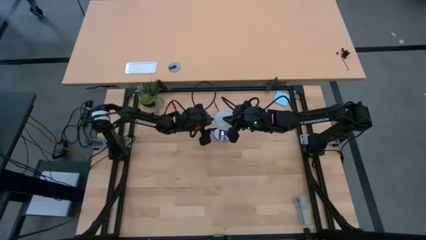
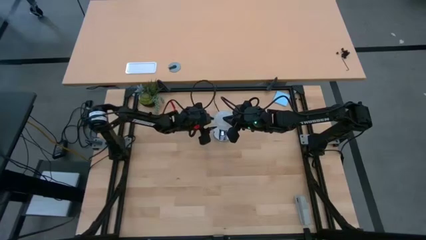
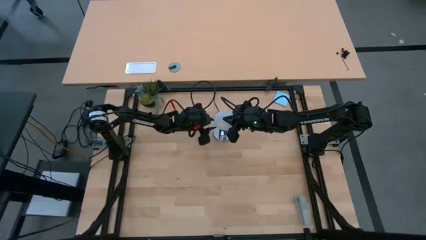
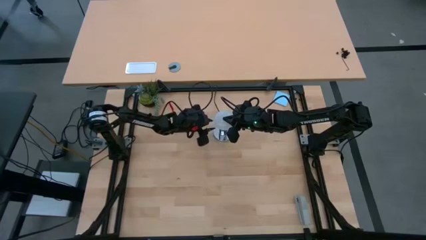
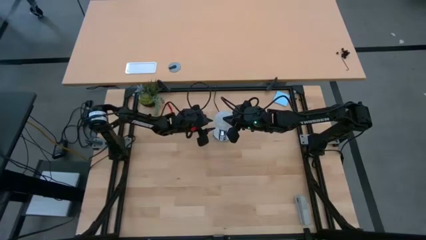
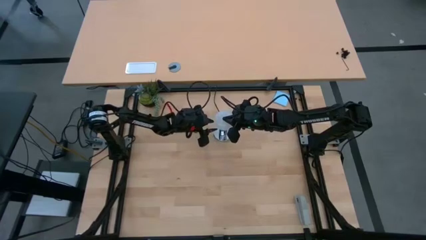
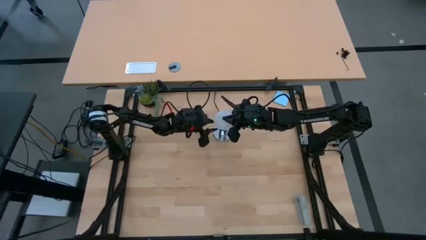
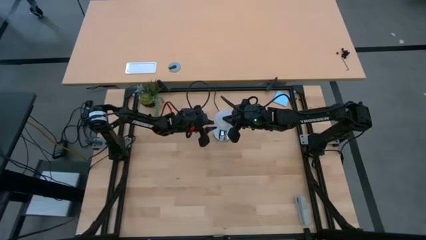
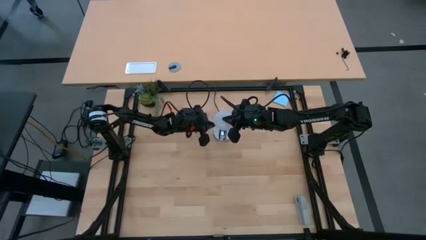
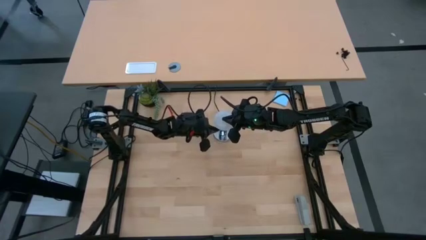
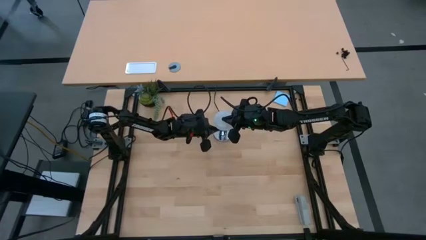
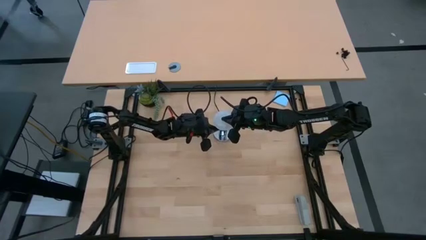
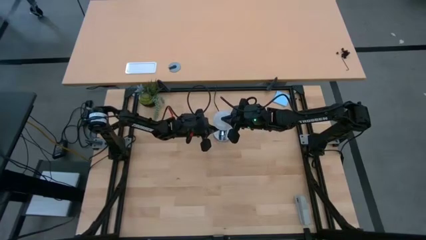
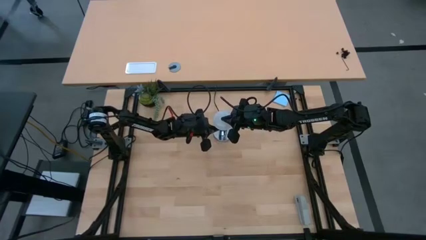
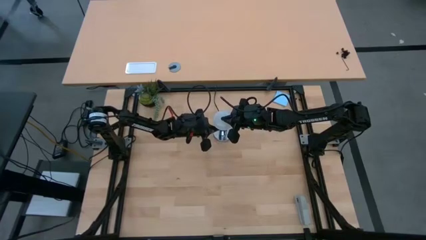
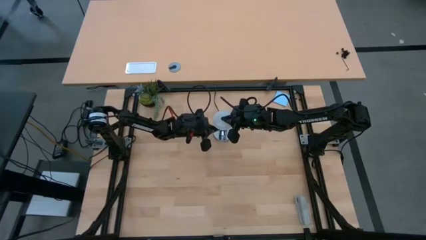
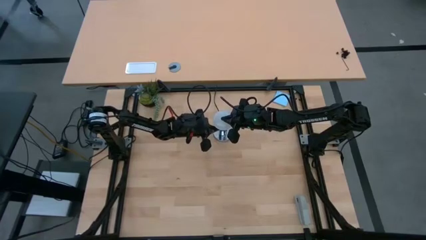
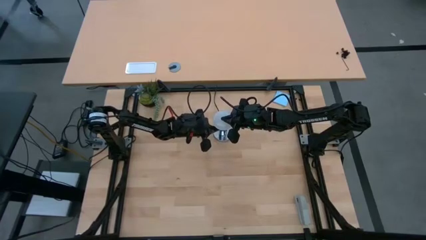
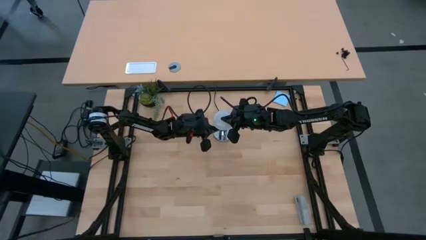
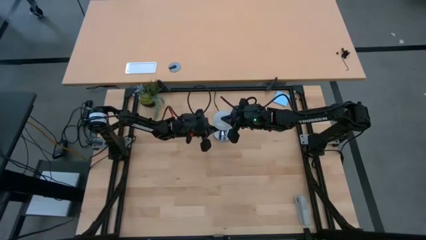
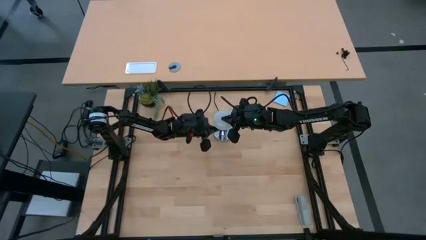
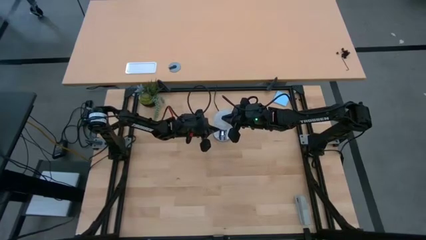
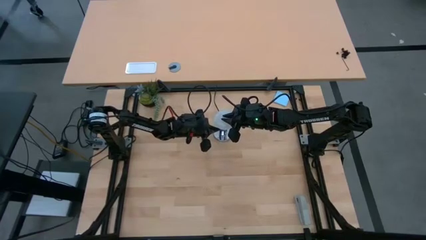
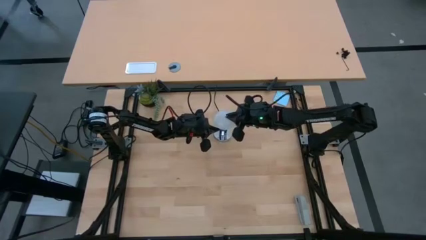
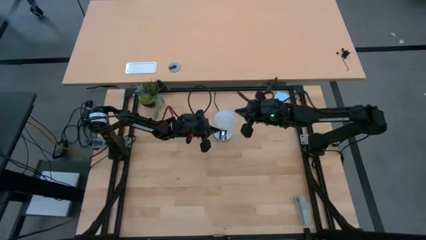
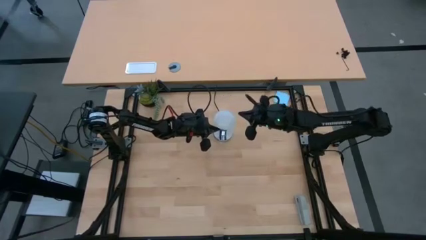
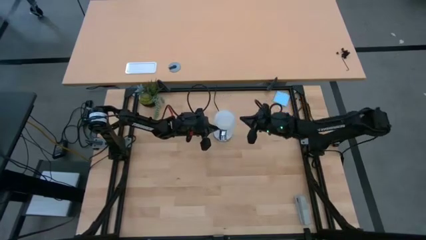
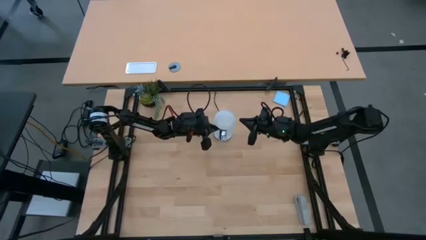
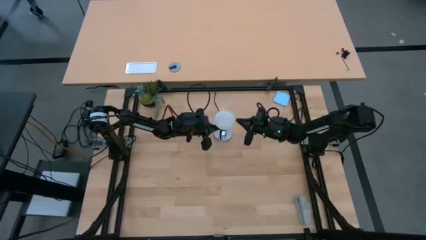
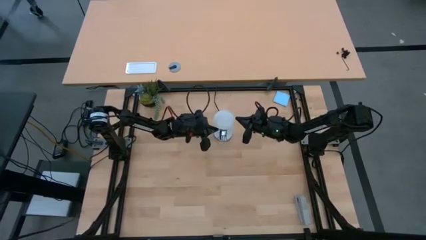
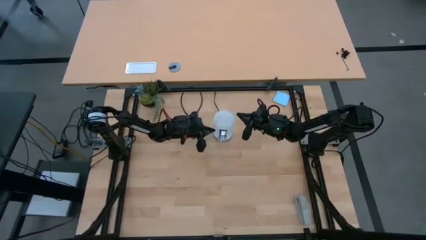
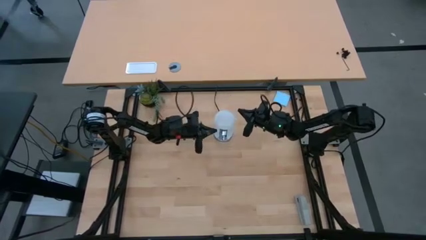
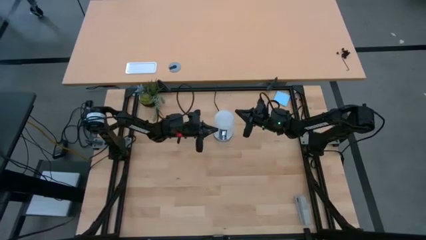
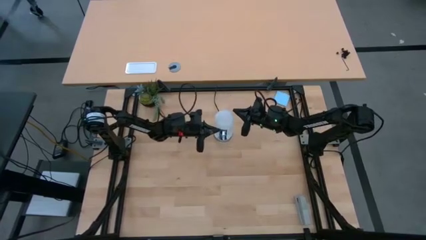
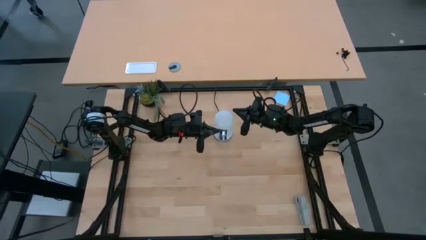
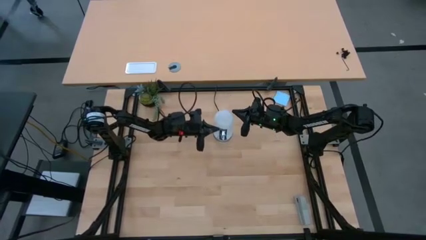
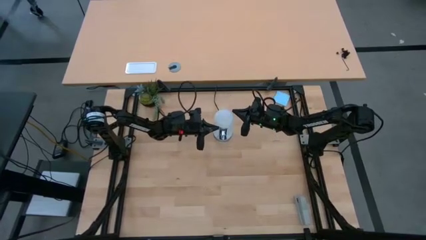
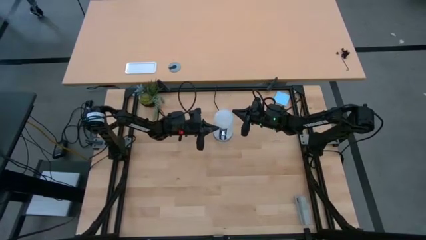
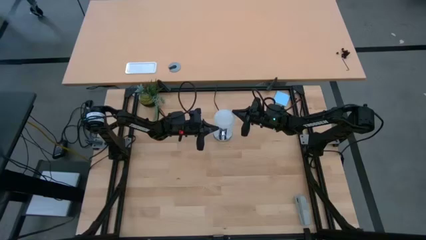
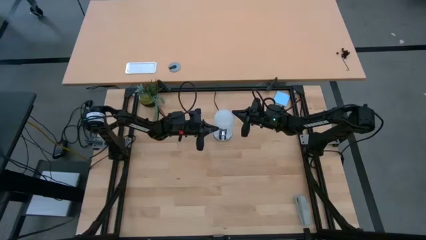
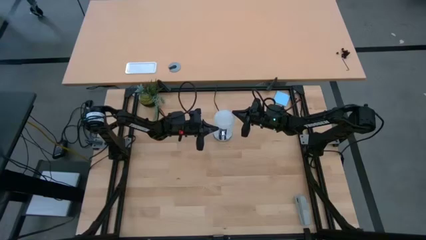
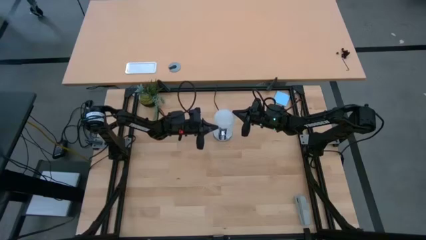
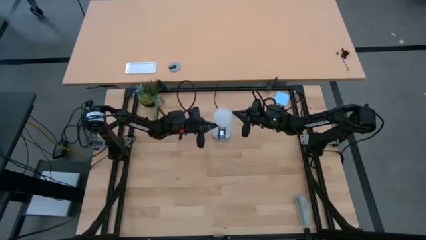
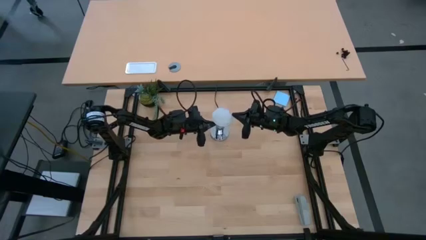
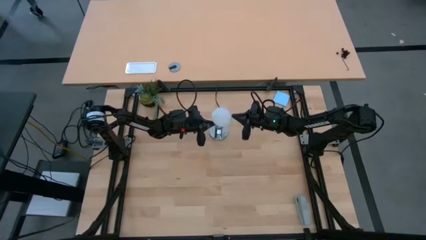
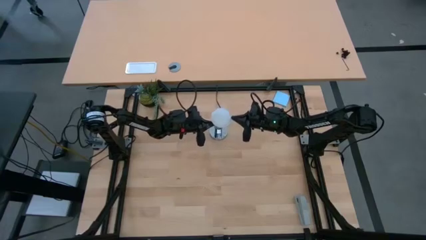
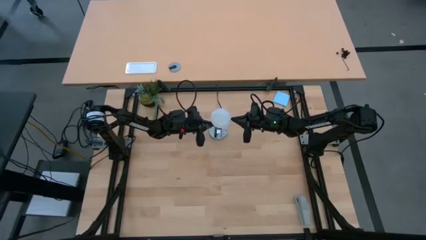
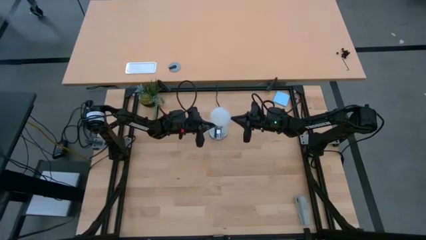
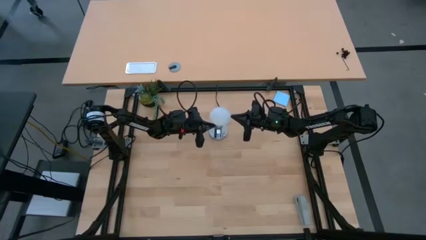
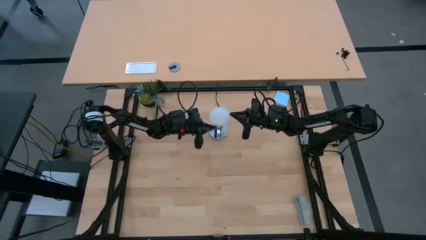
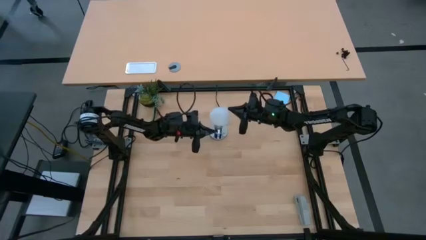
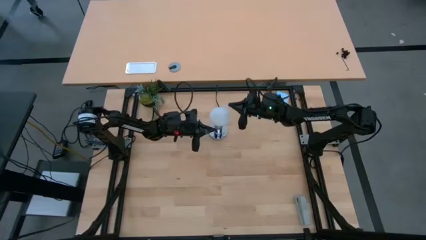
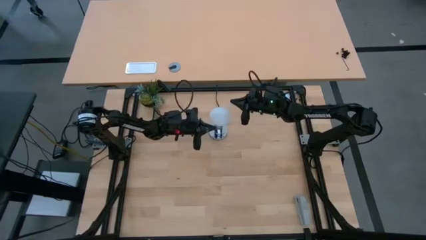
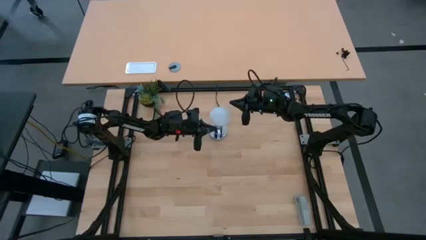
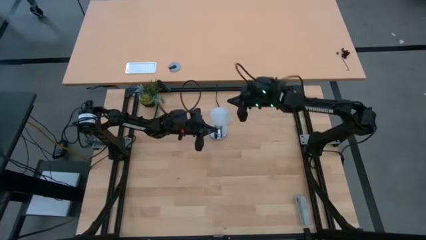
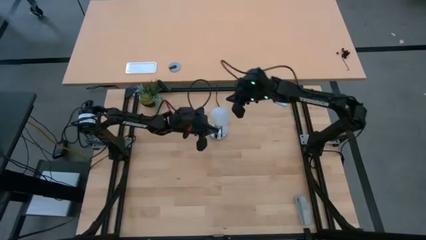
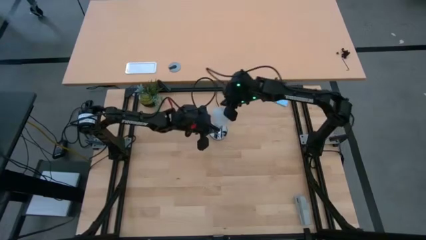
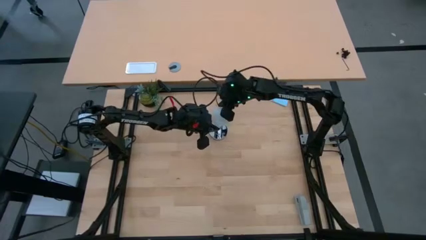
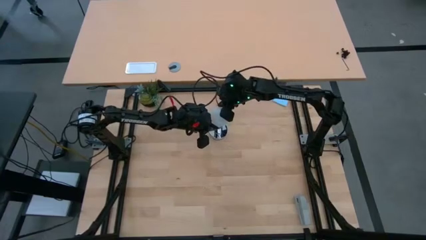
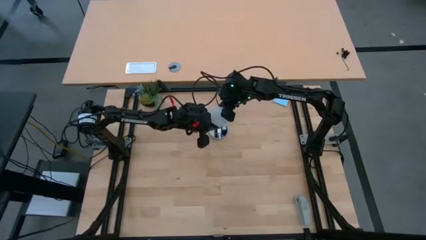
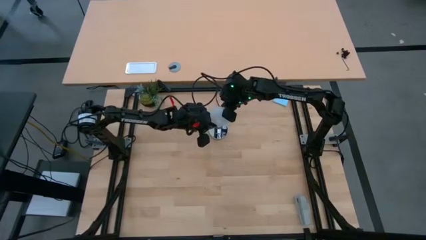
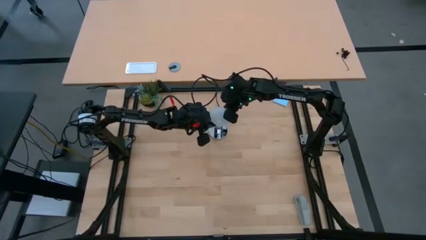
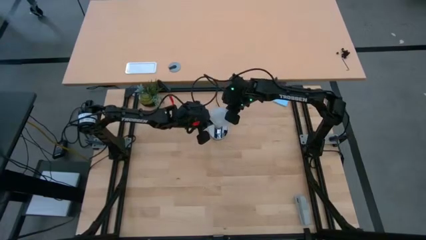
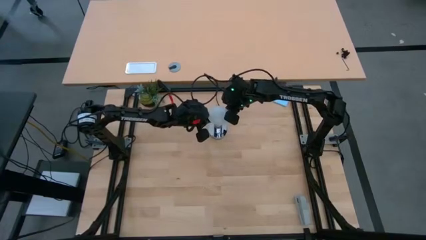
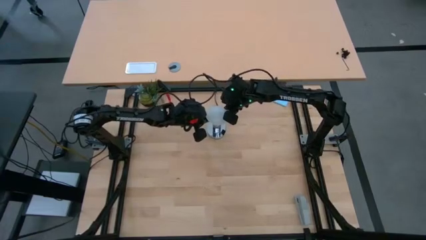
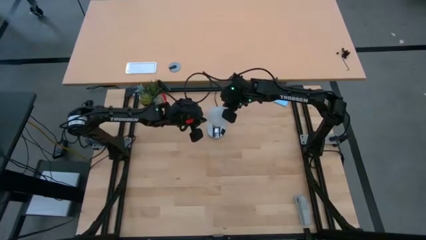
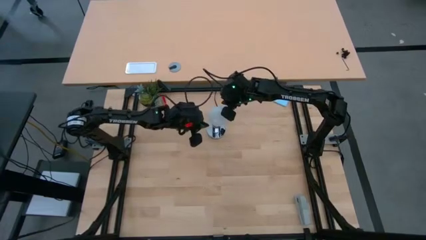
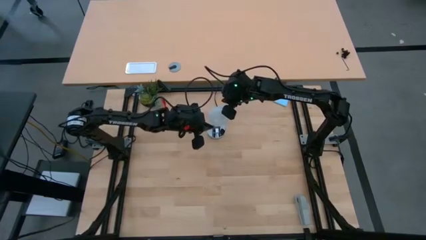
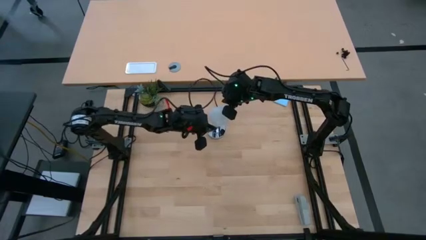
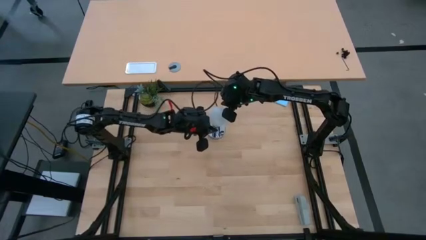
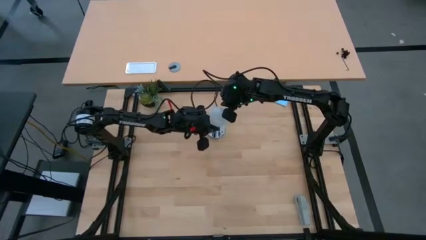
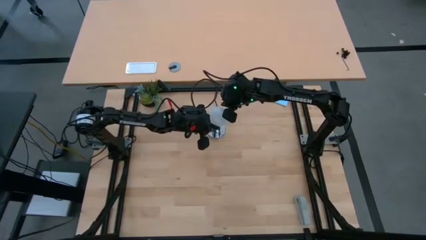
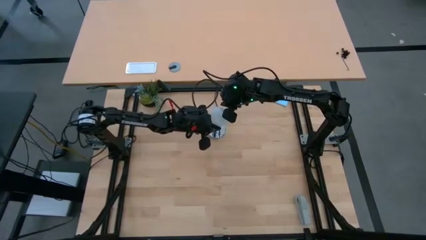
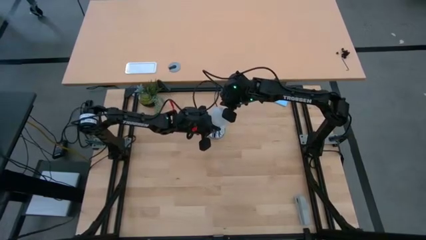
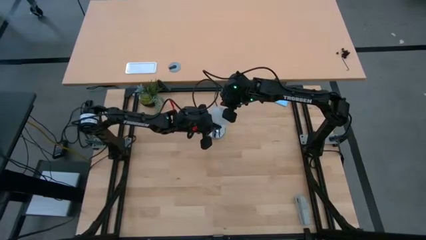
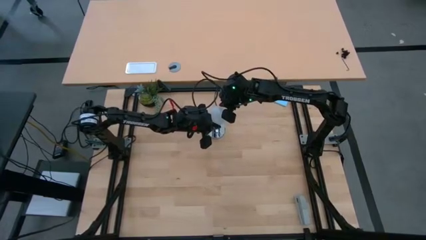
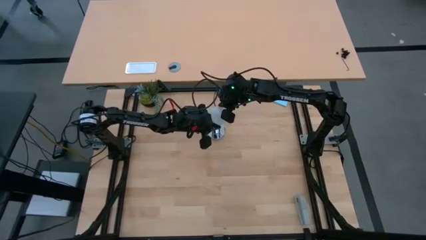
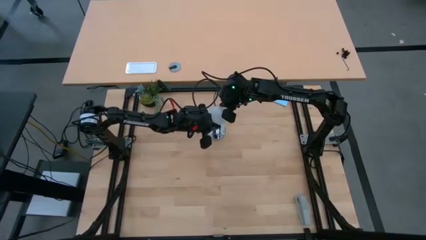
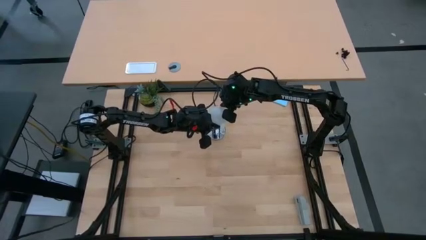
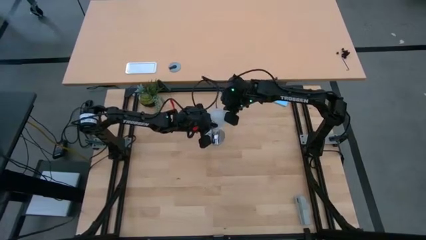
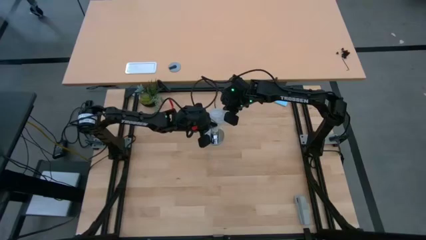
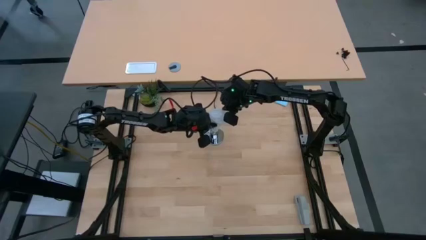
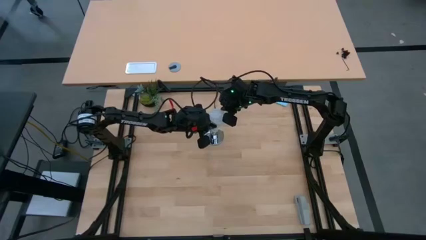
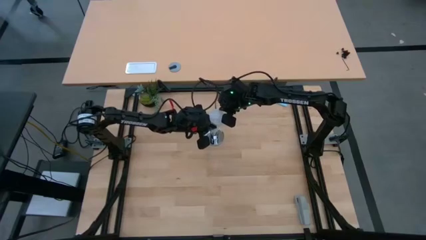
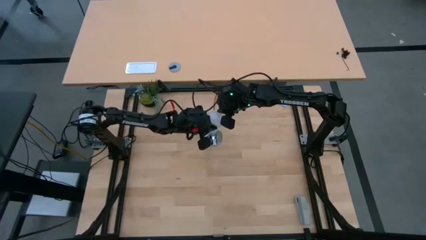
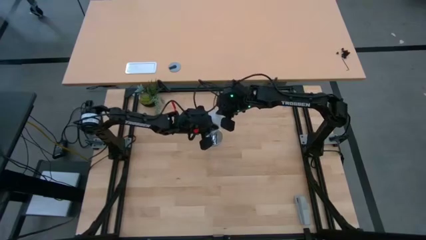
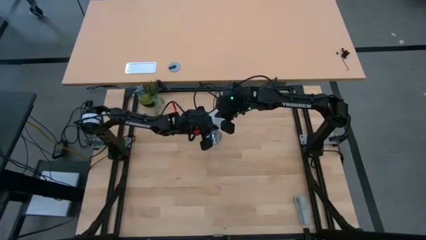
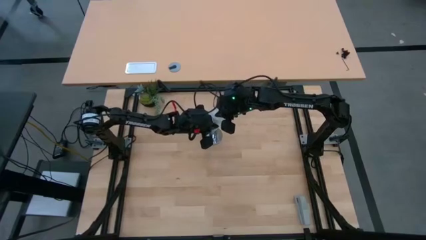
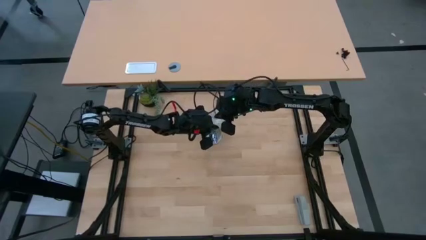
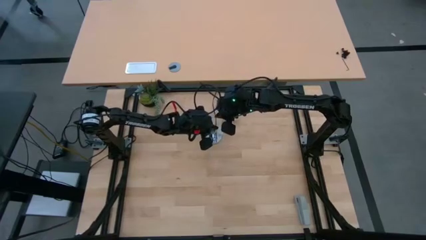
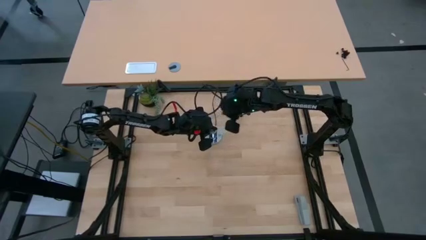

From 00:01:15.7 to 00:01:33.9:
Task: Screw lightbulb
Insert the white lightbulb into the desk lamp
